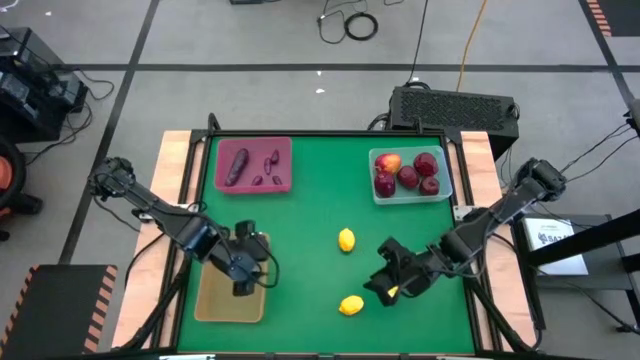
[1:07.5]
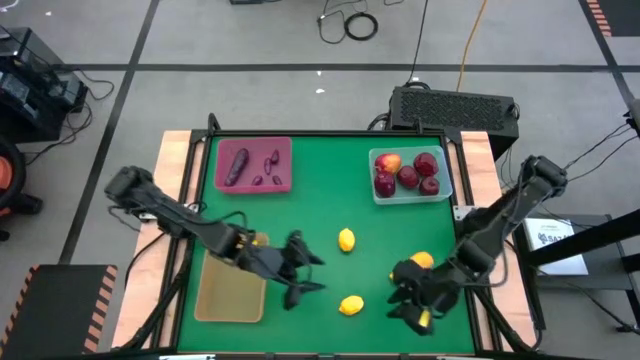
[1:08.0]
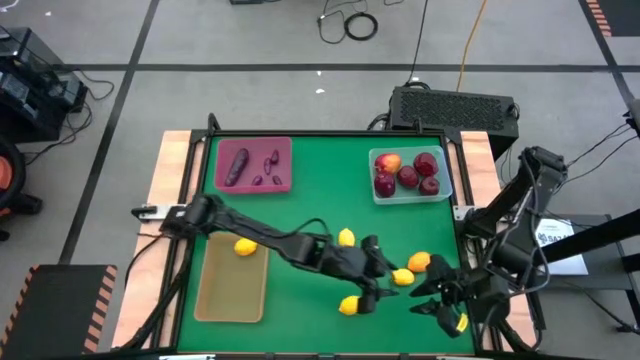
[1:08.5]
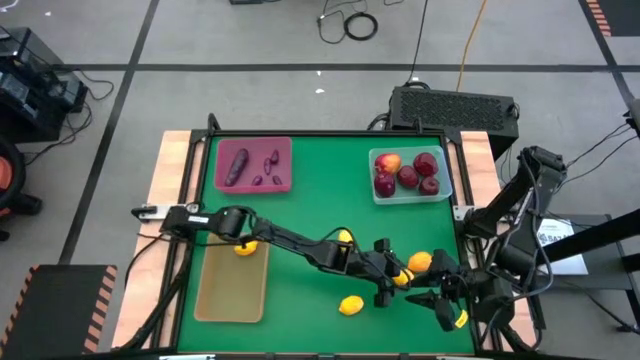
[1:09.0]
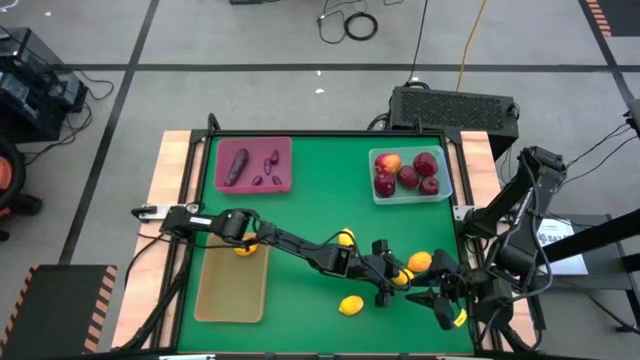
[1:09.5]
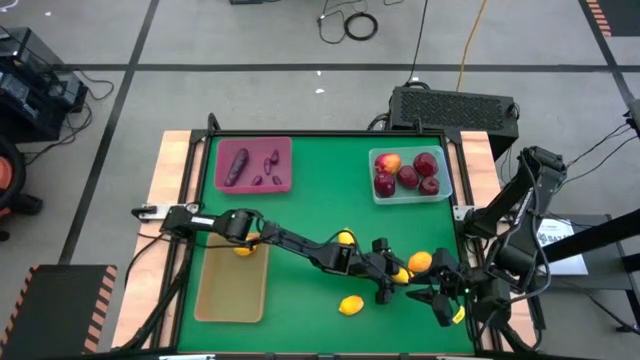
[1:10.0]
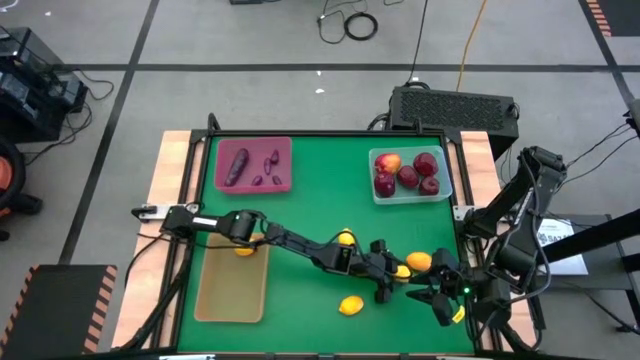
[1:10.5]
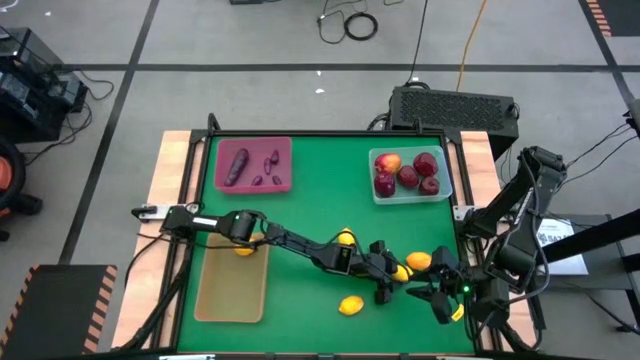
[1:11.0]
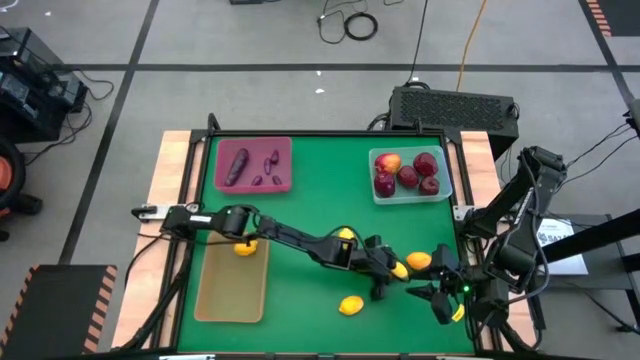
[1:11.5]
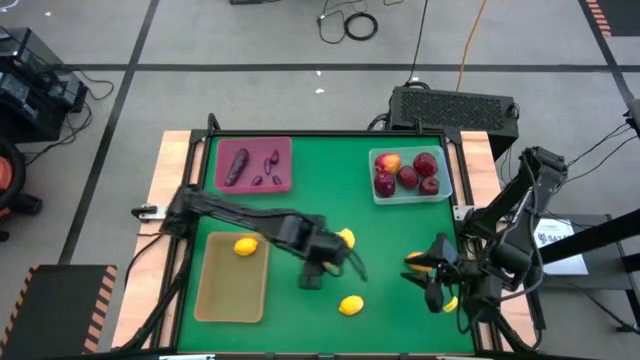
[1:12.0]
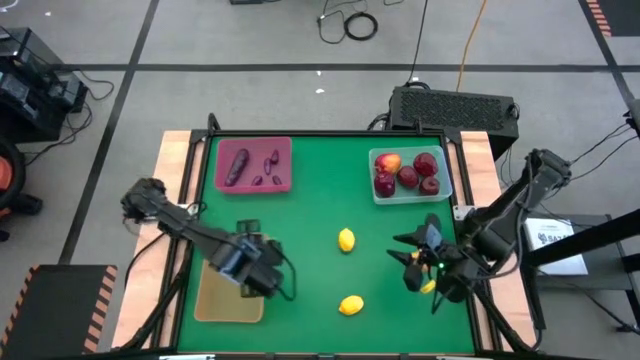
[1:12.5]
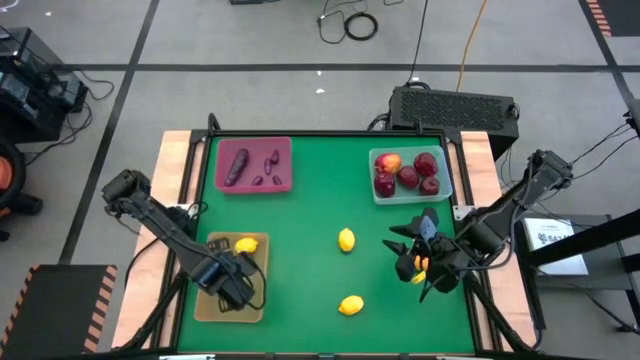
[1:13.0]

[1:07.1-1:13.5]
Task: Sort produce into baskets
Put the lemon into the green bin

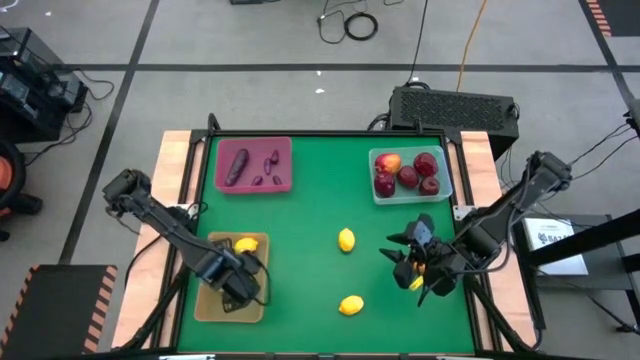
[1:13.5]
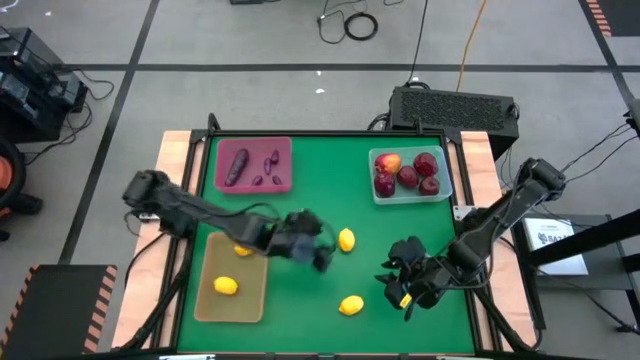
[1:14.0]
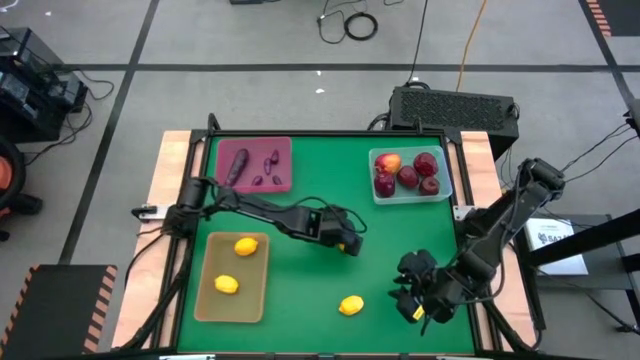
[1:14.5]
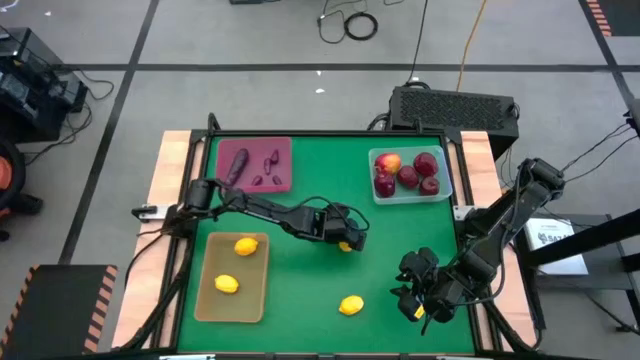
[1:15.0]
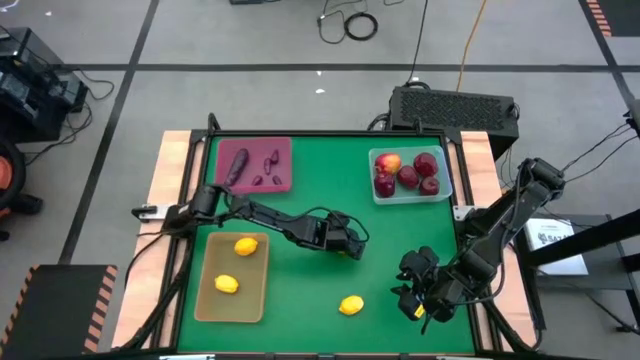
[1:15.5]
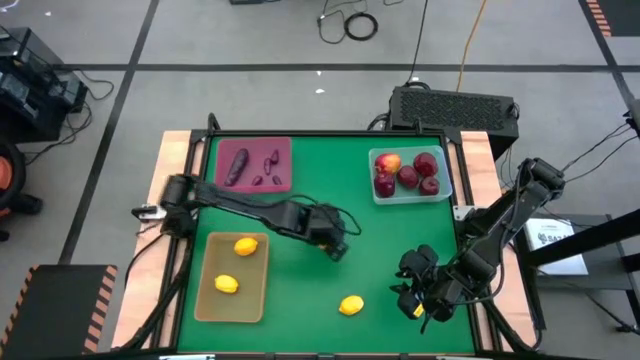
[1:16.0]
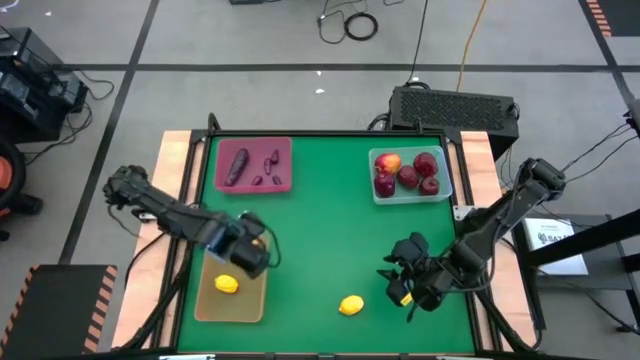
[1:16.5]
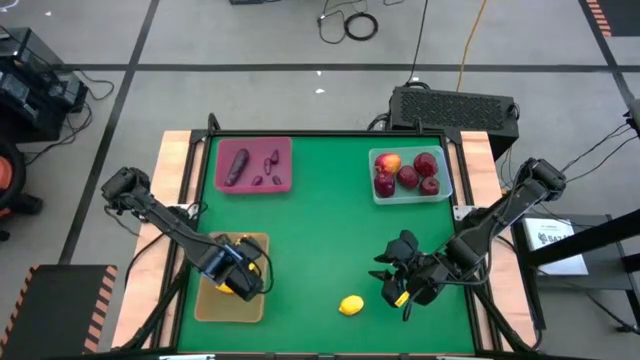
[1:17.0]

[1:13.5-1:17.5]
Put the lemon into the green bin

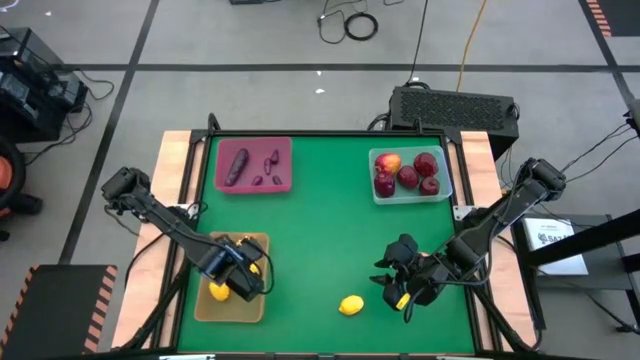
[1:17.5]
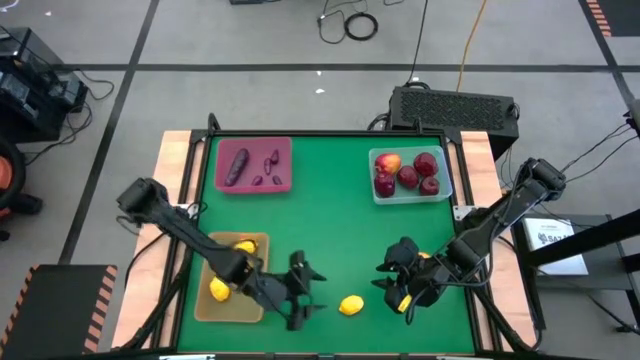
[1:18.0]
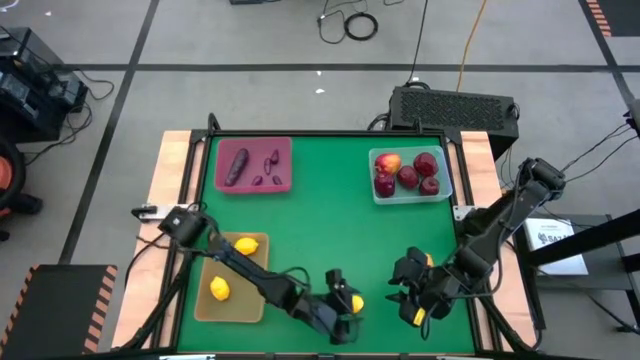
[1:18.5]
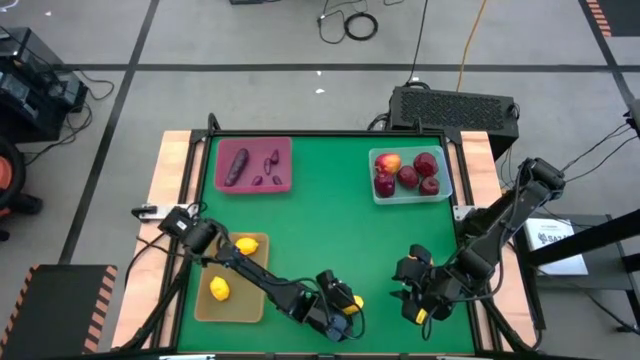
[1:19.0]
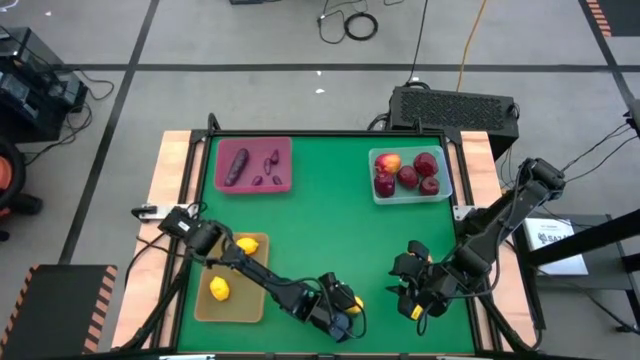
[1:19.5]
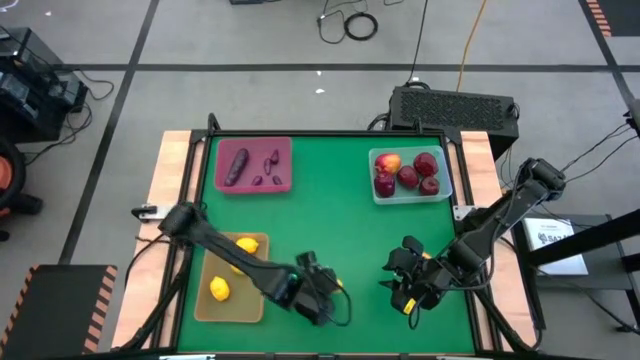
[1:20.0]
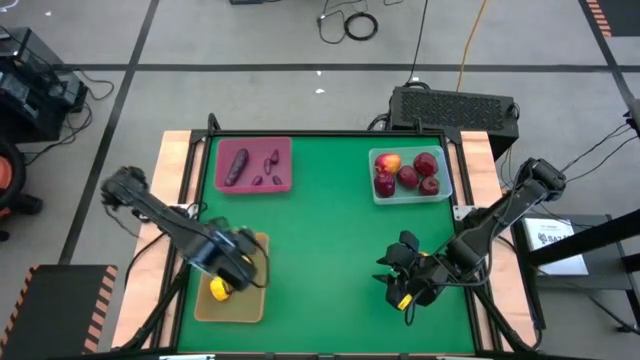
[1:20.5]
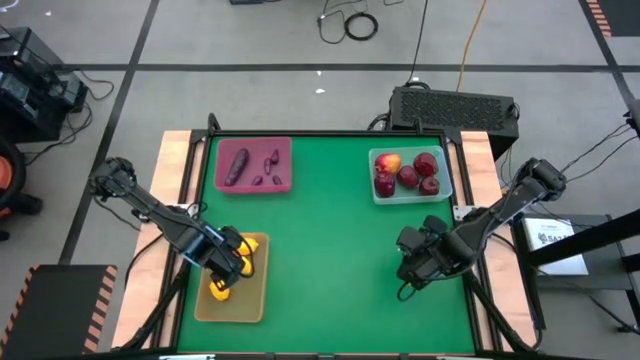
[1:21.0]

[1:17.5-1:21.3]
Put the lemon into the green bin

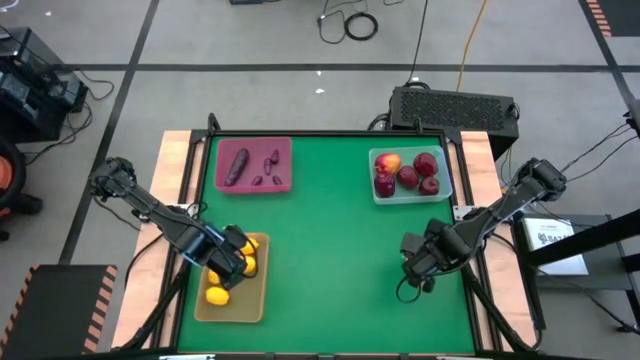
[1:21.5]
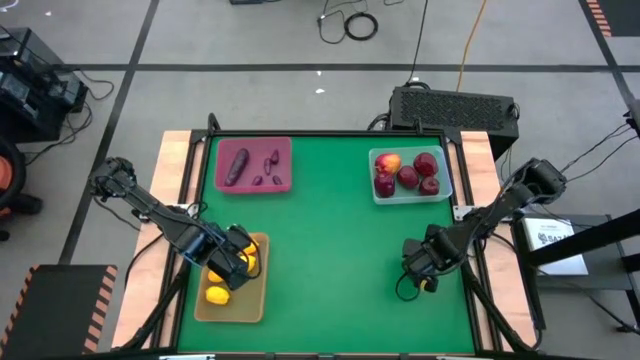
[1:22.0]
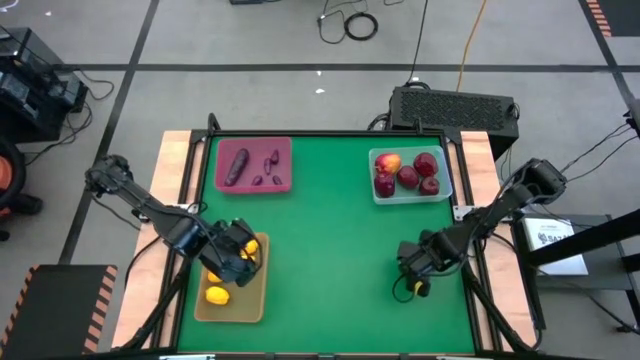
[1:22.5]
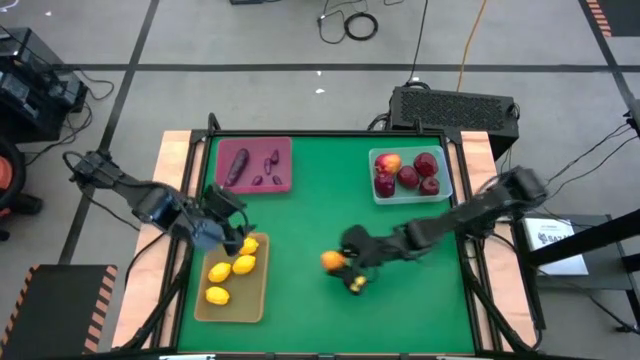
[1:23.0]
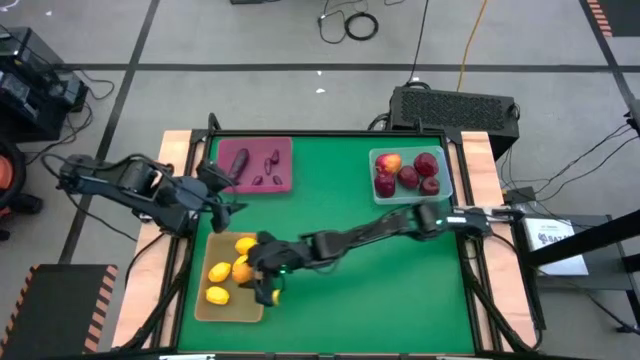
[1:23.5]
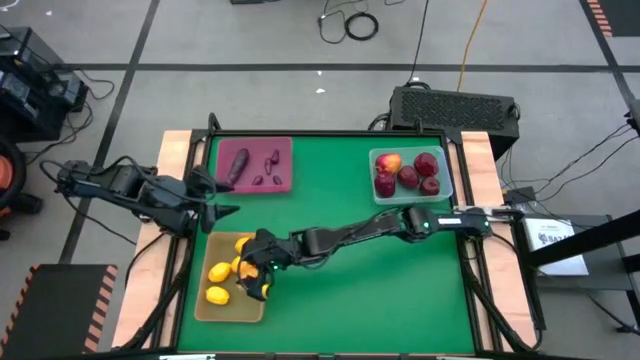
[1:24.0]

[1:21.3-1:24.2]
Put the lemon into the green bin

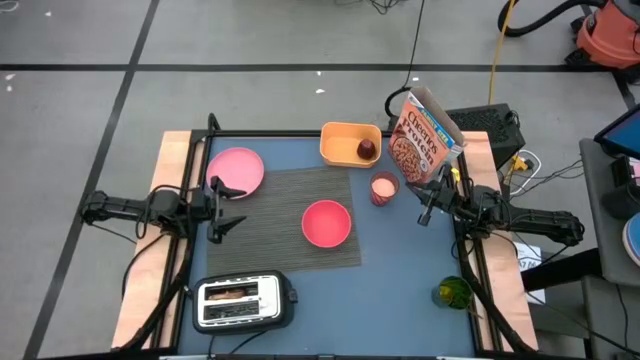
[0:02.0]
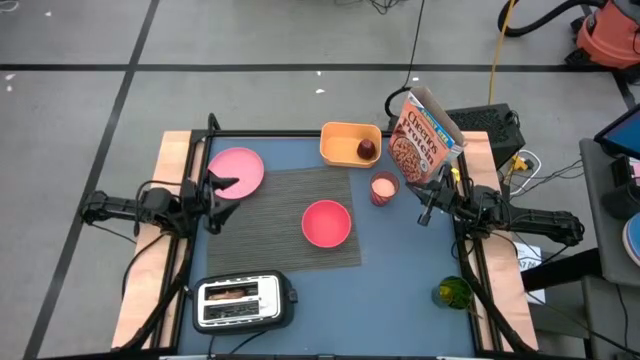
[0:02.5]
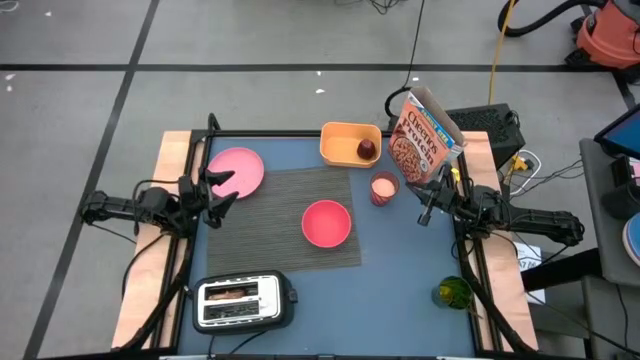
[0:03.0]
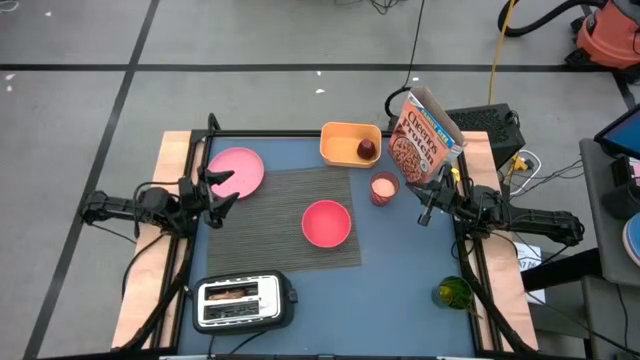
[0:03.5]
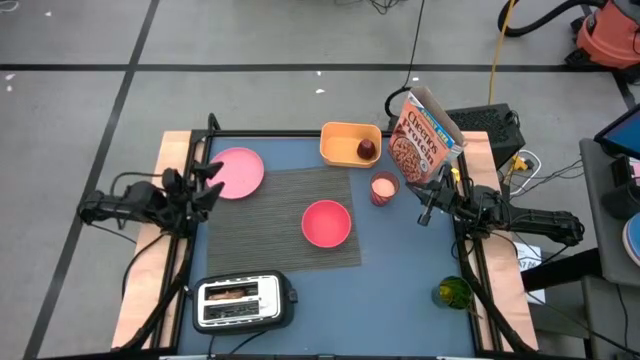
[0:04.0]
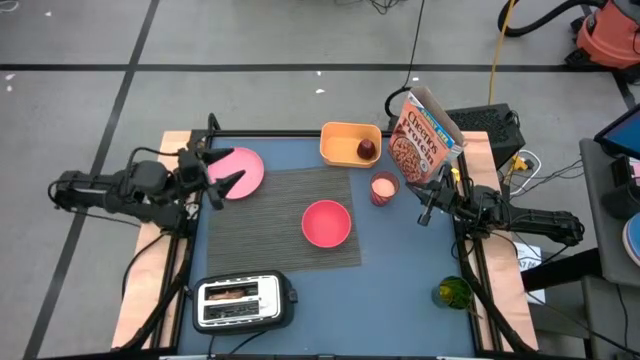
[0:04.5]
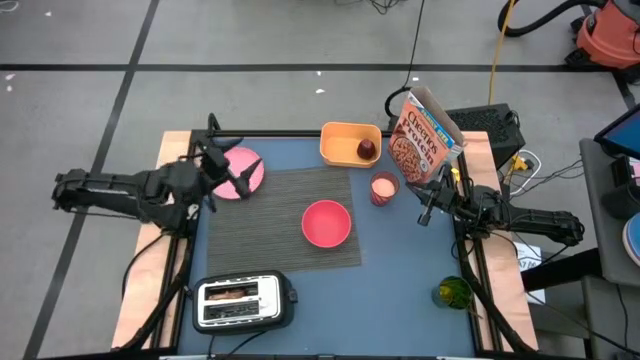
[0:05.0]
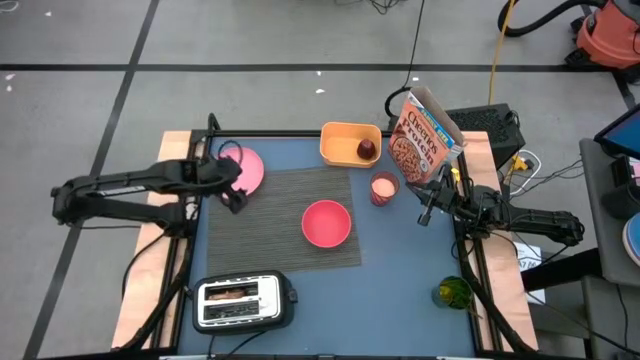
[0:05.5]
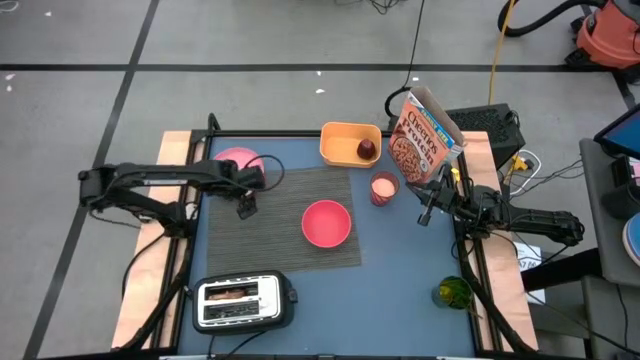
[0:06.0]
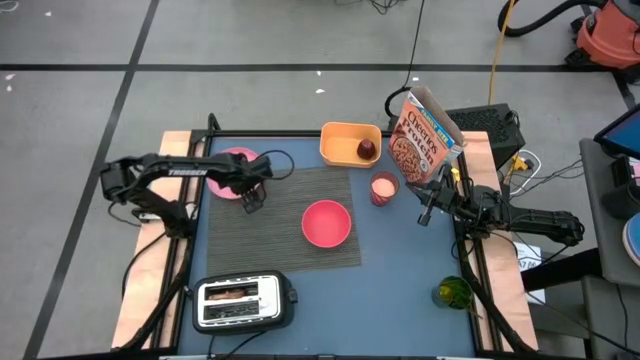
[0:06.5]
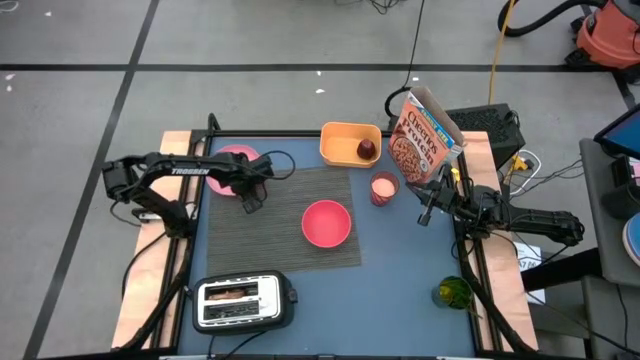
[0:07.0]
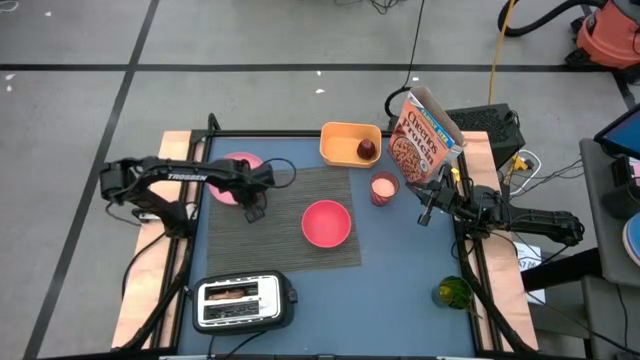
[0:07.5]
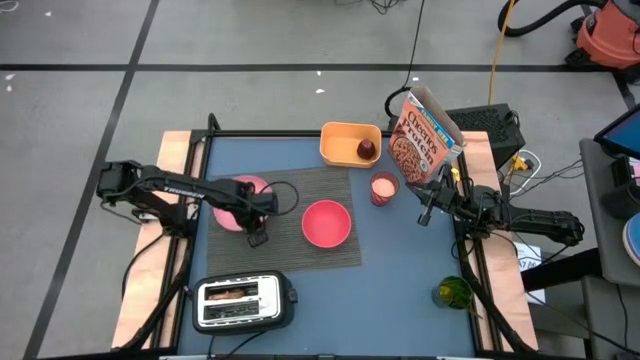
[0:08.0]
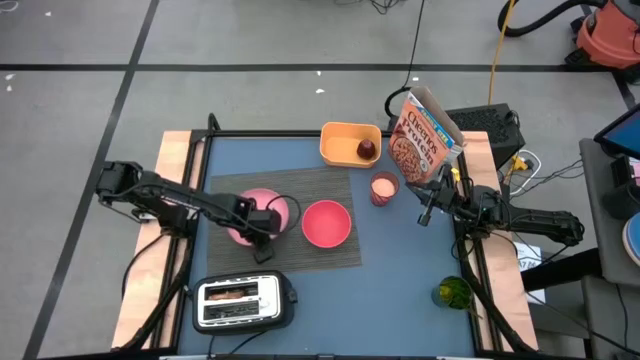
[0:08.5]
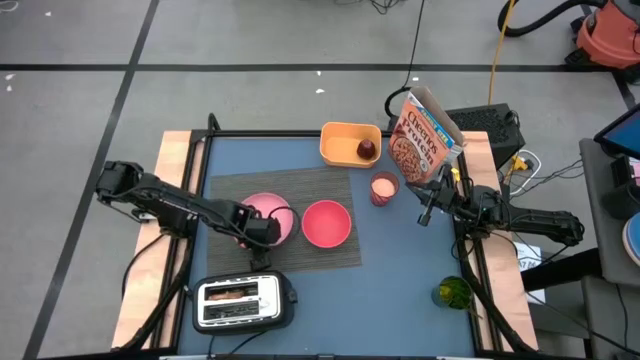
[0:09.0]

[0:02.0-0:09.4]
Task: Arrange a breakfast setting
Put the pink plate on the gray table mat
